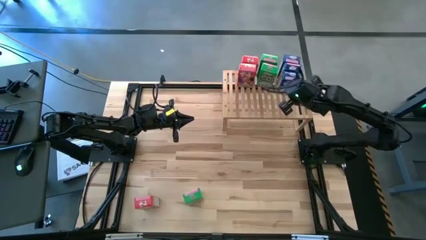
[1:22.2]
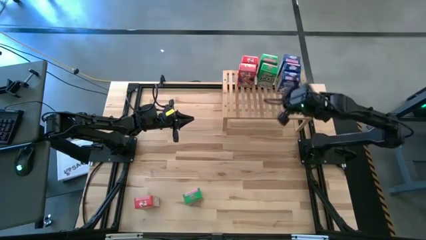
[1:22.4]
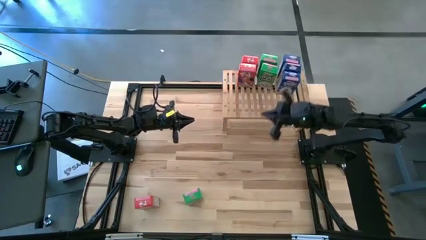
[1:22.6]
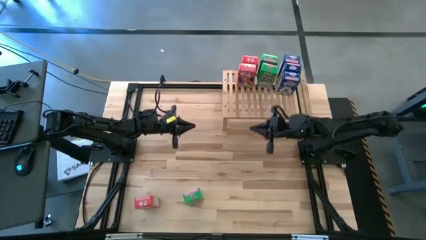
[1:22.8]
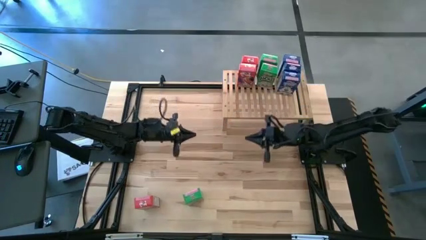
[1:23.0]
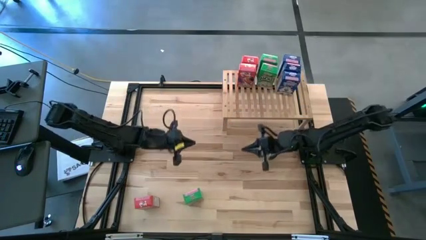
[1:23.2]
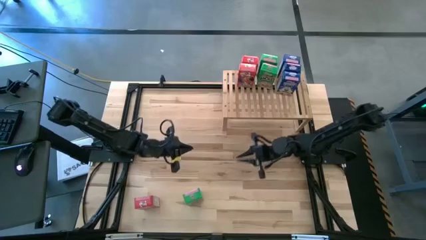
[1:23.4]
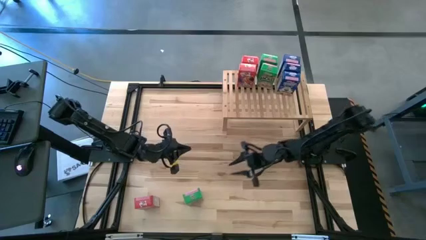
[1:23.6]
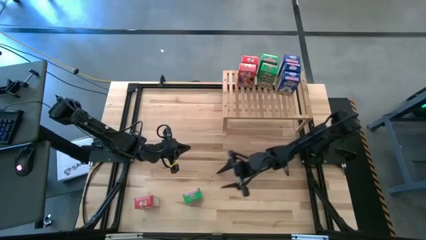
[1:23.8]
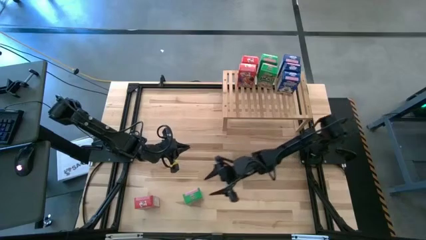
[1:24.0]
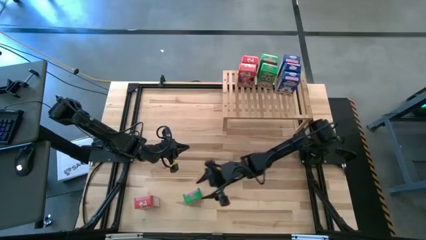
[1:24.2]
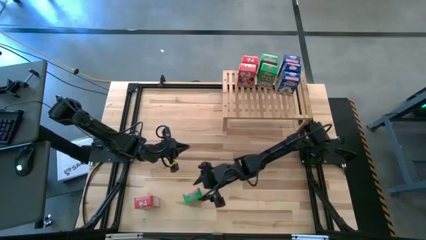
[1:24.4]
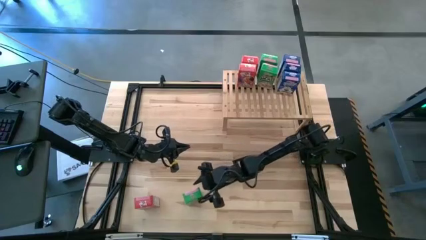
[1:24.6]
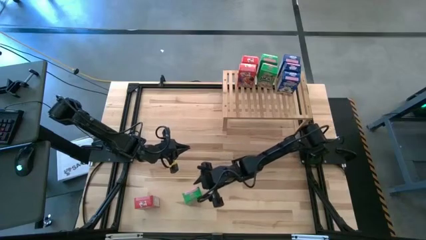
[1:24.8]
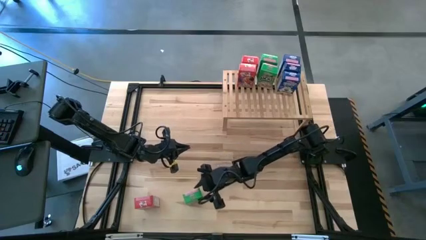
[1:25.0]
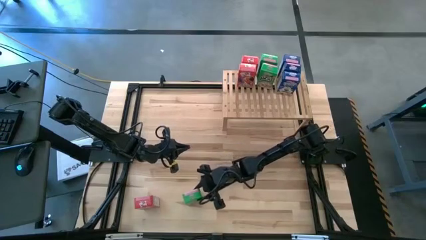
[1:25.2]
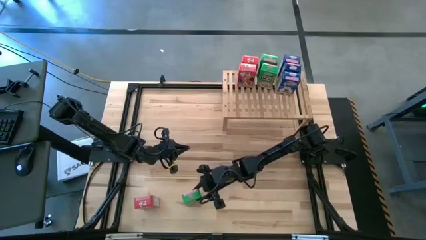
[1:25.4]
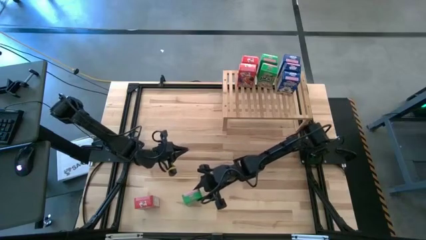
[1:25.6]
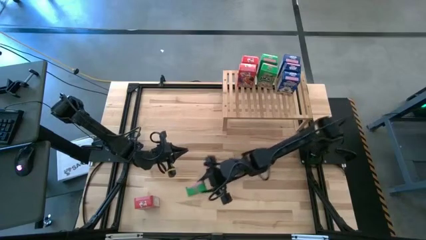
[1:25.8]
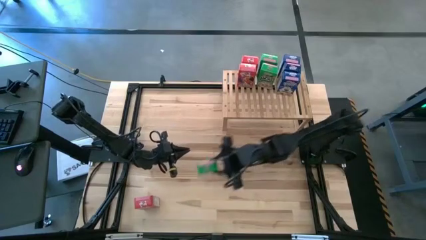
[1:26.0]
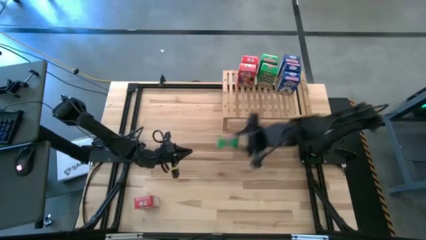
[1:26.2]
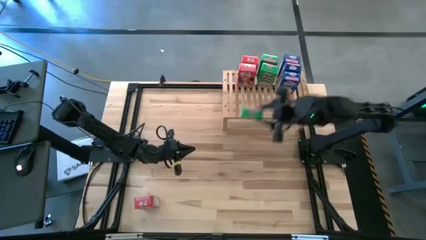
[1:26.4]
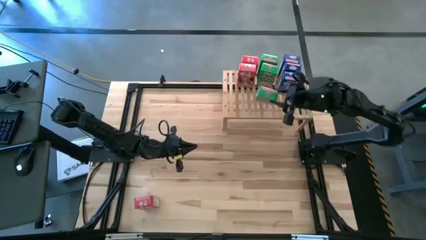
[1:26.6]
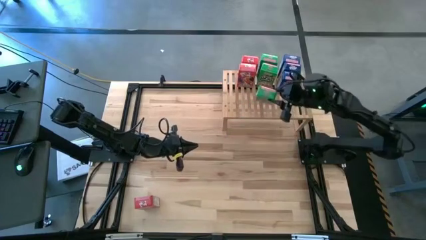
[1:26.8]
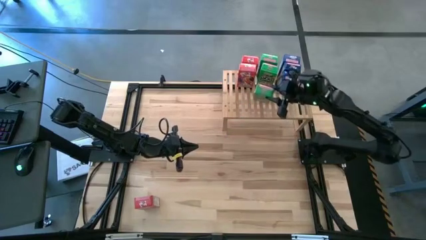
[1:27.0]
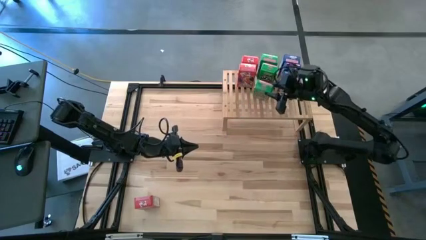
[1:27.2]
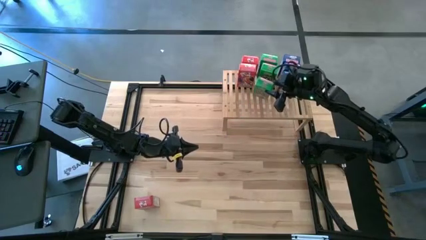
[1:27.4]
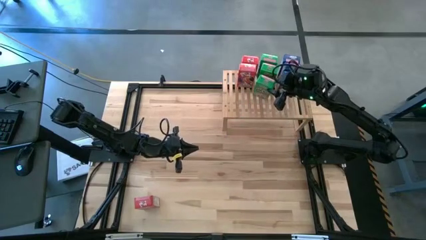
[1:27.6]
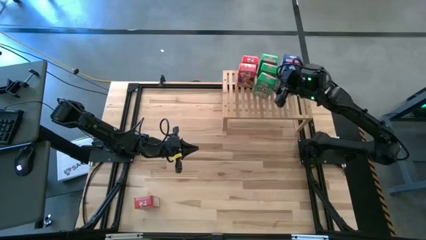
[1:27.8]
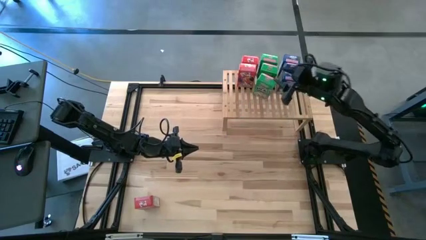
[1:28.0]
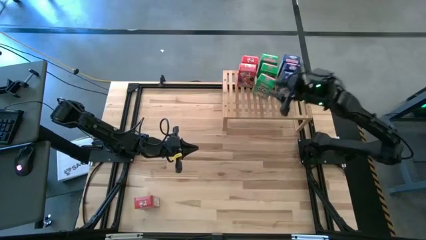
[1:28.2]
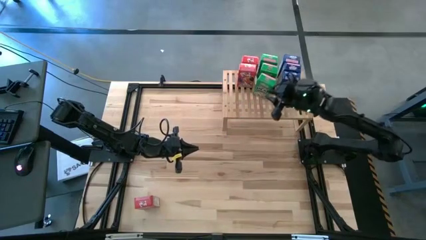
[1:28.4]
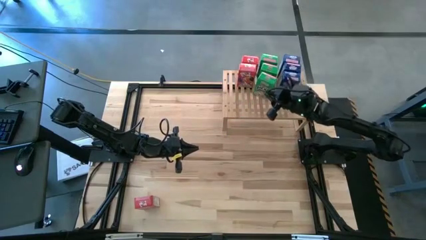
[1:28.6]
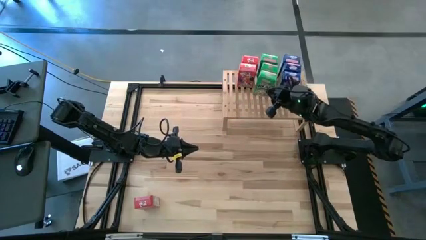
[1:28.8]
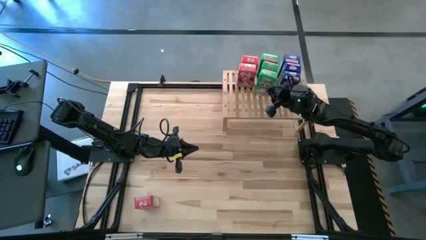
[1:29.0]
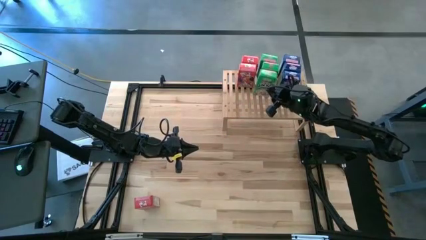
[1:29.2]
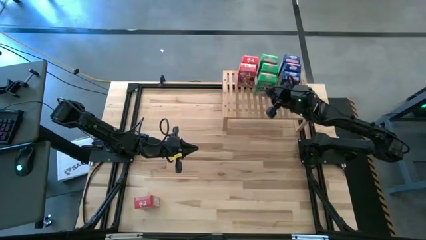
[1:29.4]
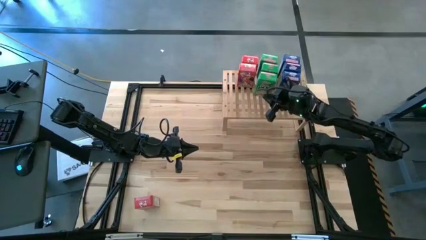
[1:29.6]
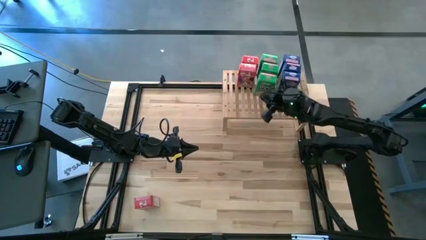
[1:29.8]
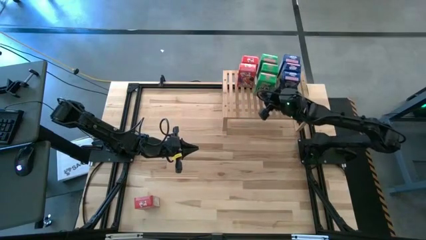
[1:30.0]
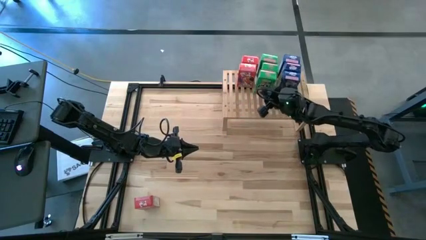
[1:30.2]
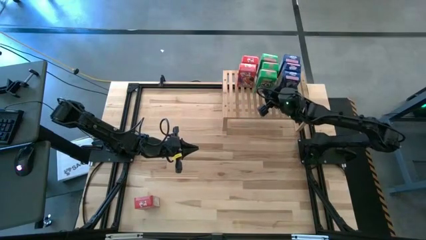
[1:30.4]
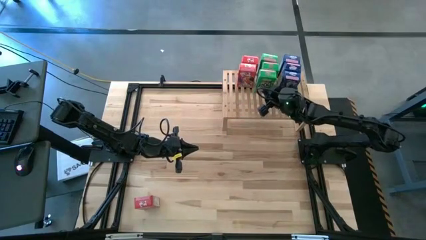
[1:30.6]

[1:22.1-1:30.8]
Task: Stack cereal on shelf
Put the green cereal box on the shelf aligned with other green cereal box

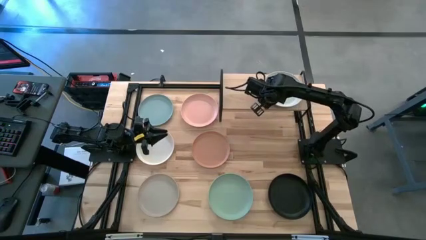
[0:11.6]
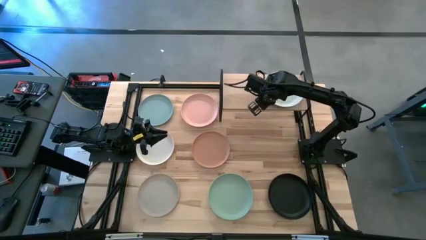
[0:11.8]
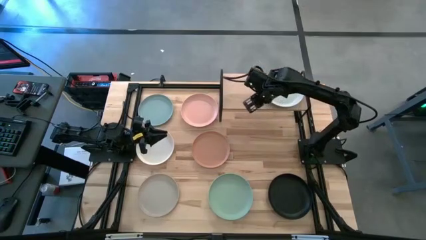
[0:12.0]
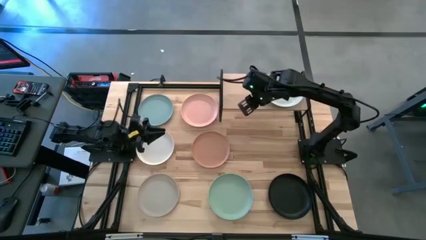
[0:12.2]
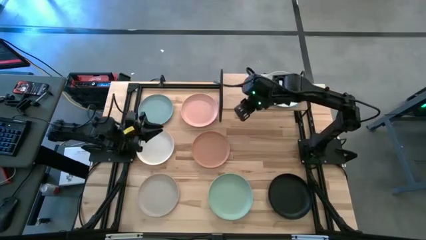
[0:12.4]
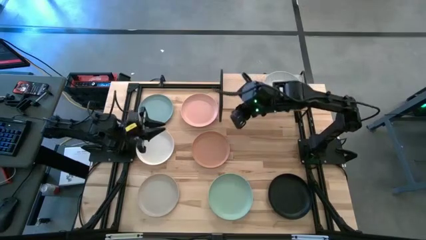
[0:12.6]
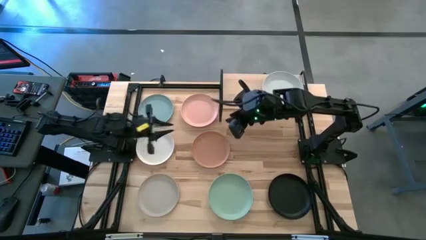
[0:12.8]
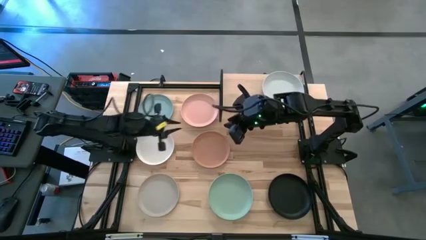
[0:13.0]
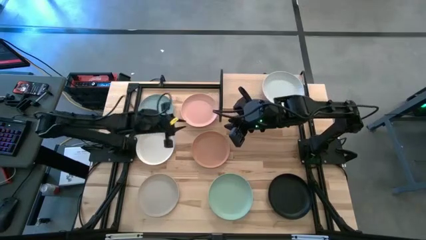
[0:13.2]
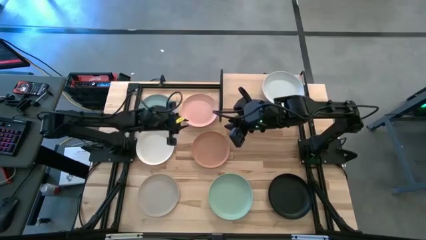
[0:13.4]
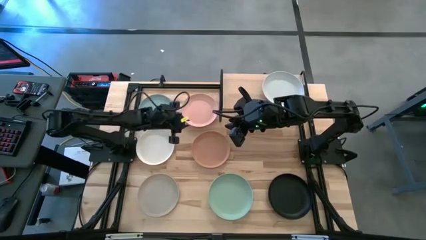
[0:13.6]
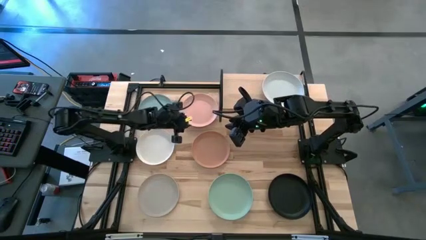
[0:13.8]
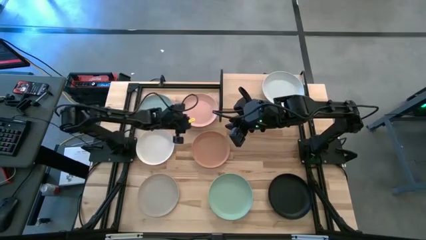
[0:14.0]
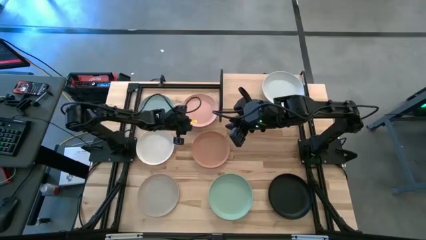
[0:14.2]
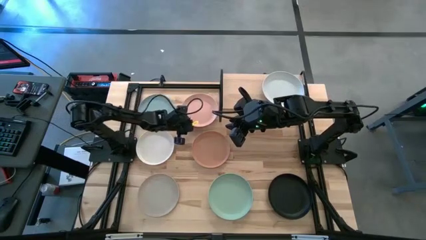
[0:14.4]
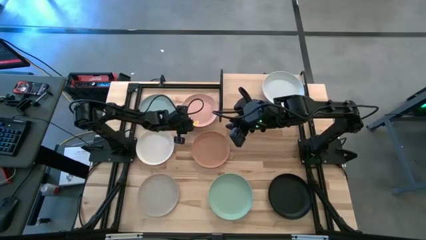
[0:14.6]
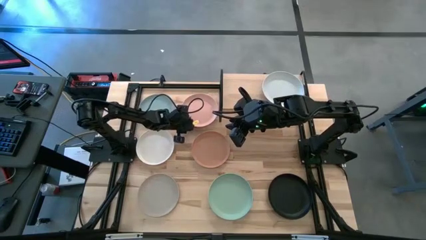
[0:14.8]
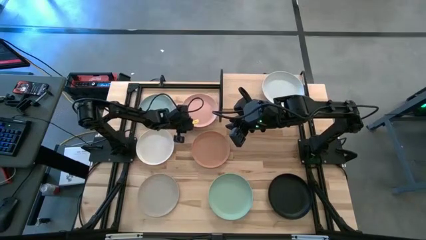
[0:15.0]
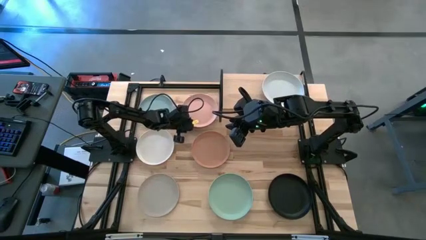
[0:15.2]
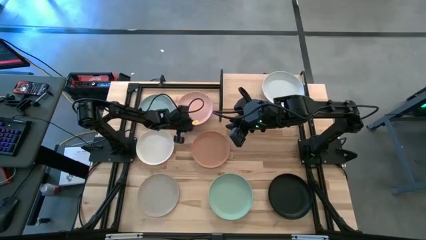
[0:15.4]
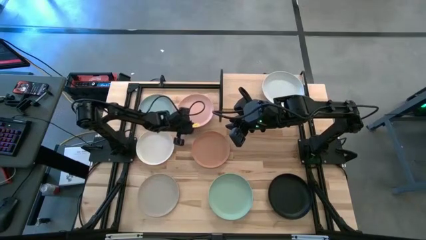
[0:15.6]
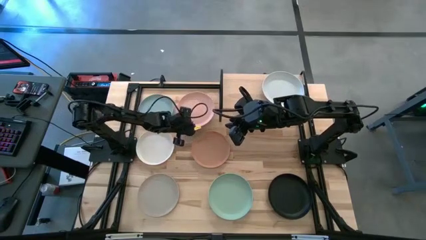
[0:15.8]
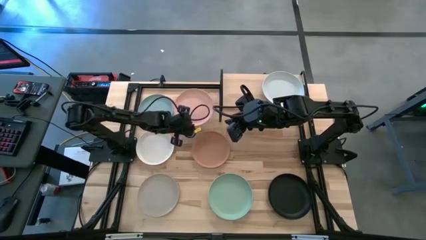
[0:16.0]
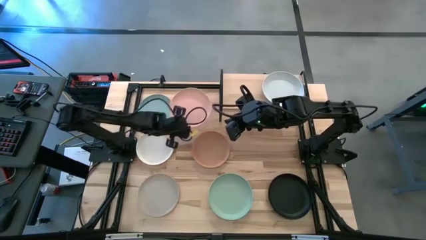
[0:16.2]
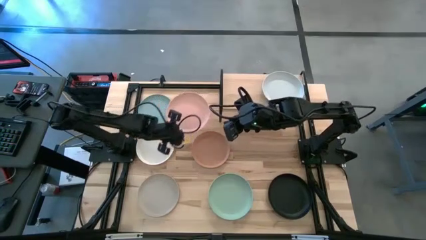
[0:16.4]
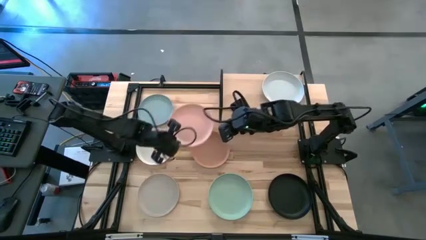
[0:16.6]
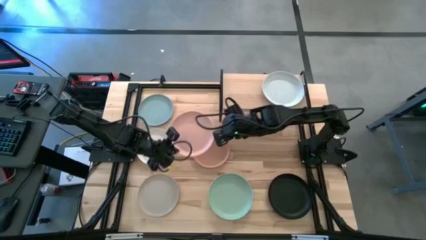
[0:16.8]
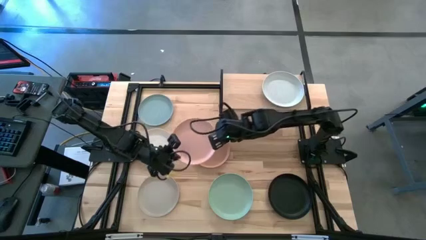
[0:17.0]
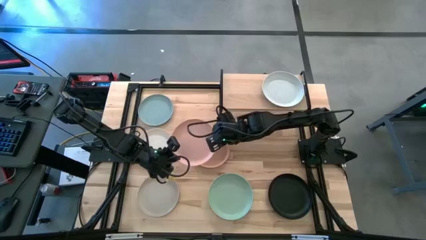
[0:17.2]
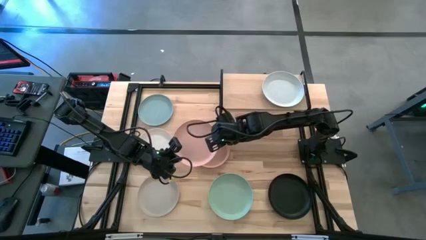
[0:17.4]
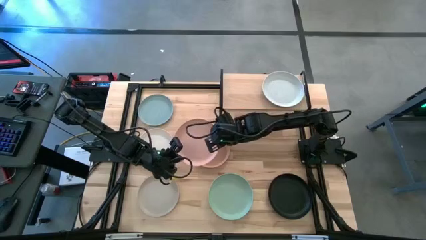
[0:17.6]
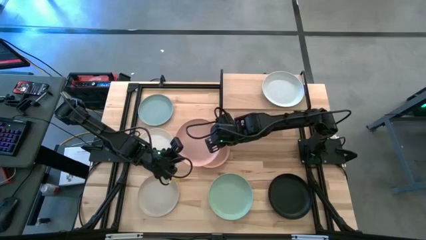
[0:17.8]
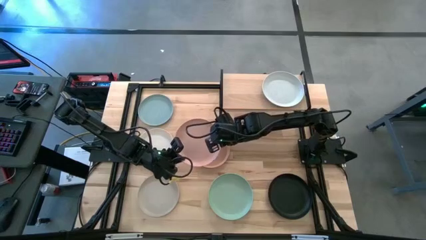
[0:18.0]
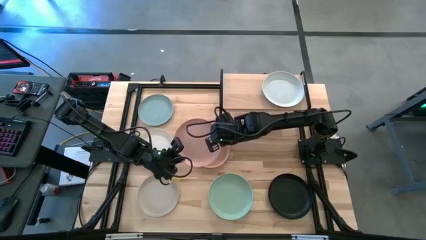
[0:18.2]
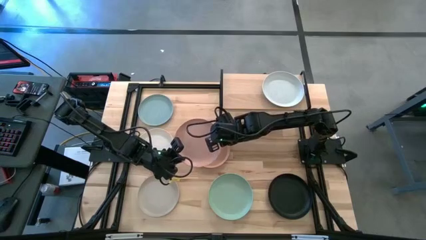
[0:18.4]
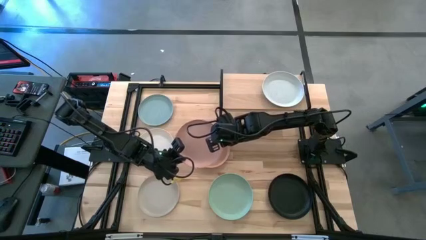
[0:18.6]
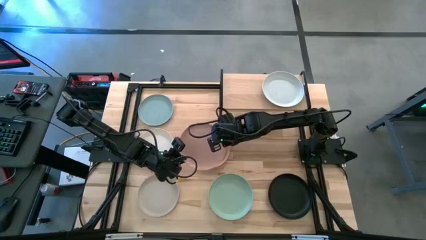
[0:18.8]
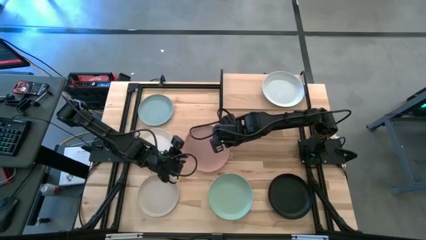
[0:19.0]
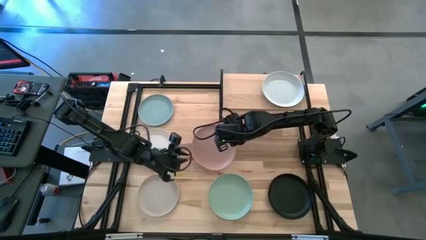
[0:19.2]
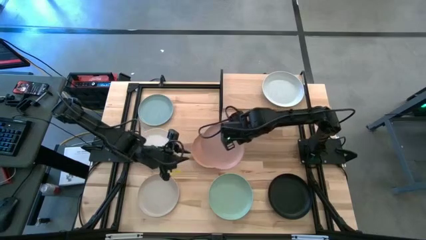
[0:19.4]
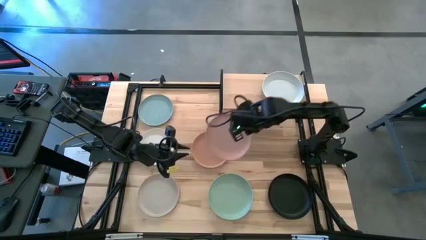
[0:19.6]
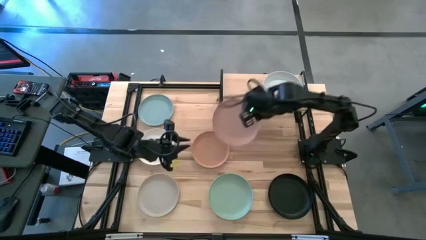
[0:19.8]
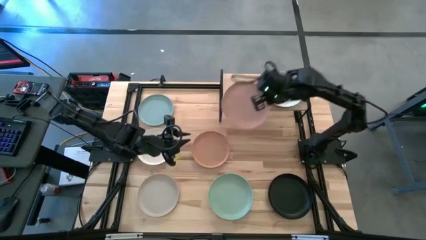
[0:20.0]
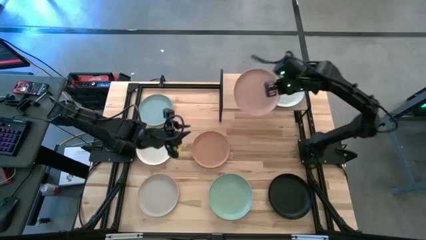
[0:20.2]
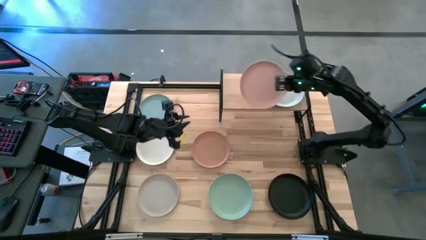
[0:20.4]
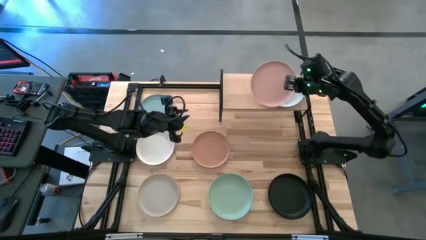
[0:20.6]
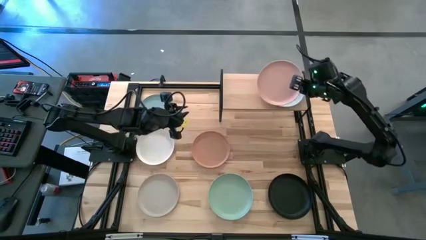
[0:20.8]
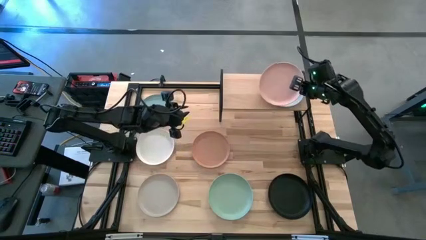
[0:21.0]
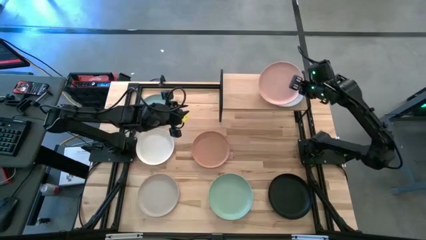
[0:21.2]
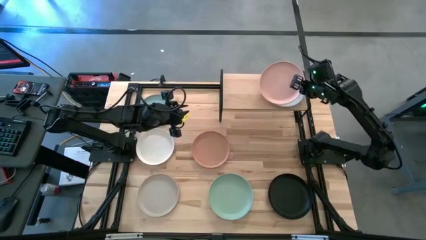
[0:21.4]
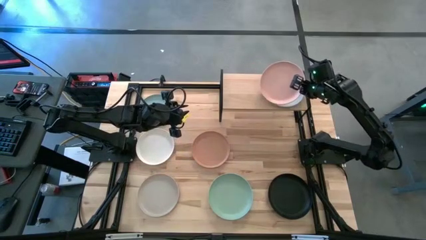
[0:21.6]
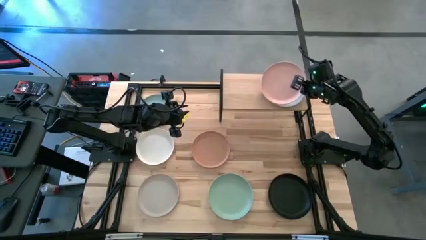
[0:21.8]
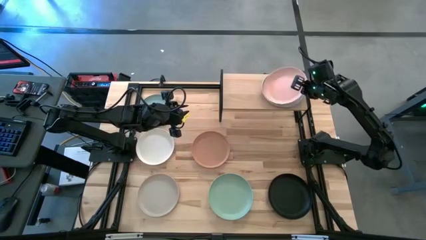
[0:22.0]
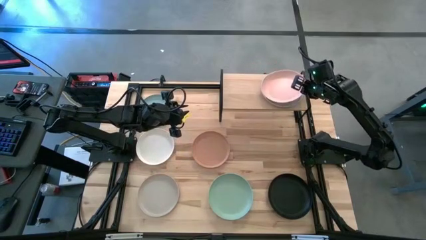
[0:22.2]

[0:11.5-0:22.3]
Task: Place and stack plates onto a shelf
Stack the light brown plate on top of the white plate on the shelf
